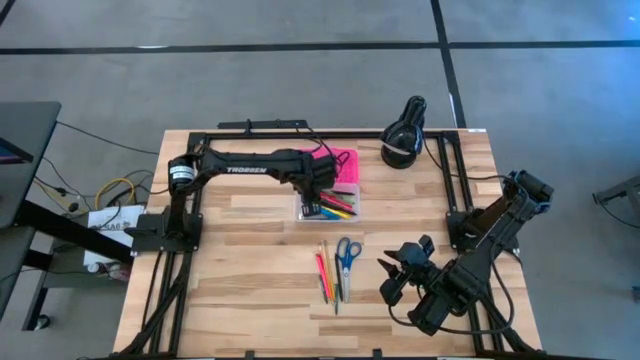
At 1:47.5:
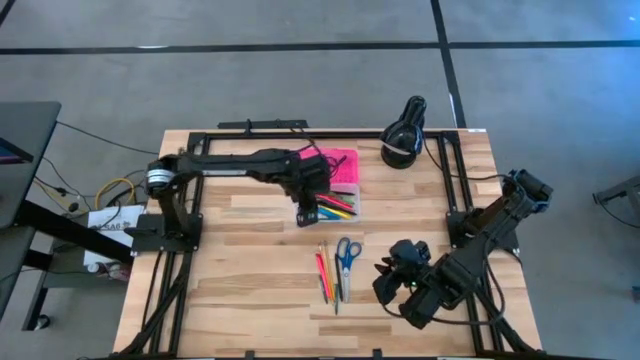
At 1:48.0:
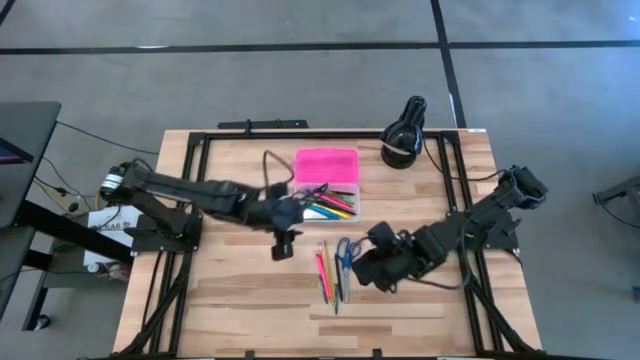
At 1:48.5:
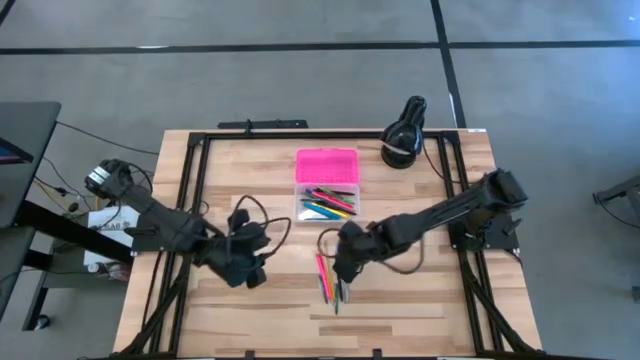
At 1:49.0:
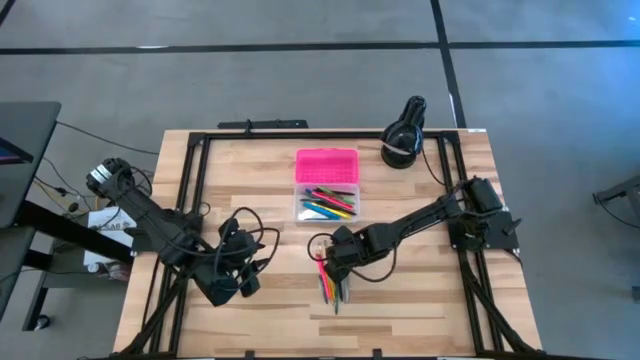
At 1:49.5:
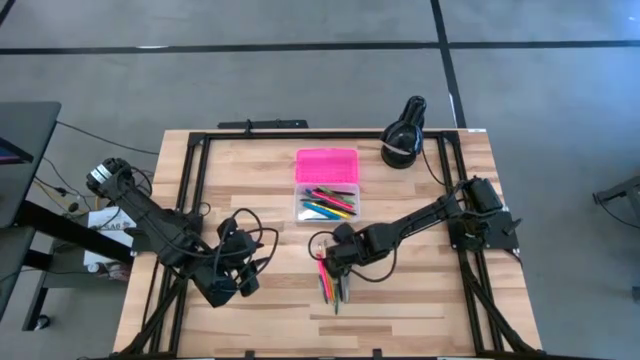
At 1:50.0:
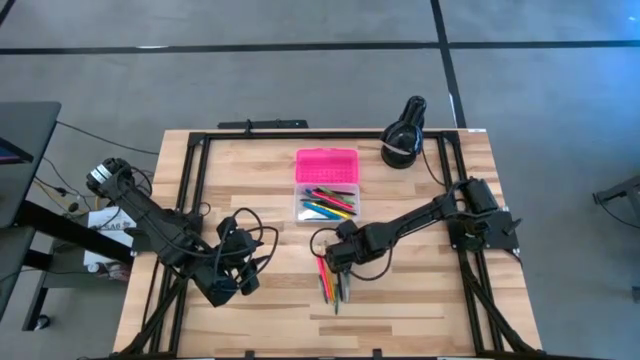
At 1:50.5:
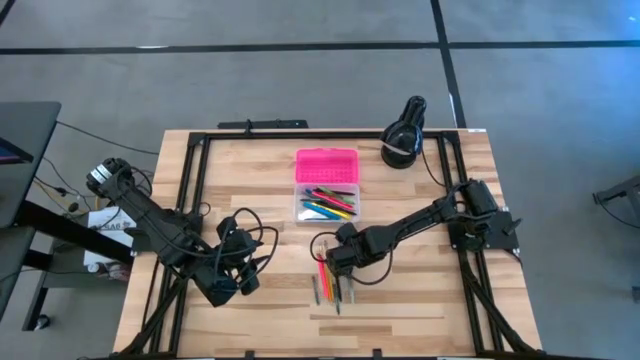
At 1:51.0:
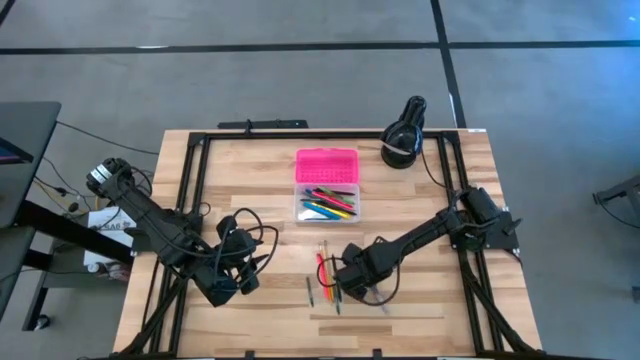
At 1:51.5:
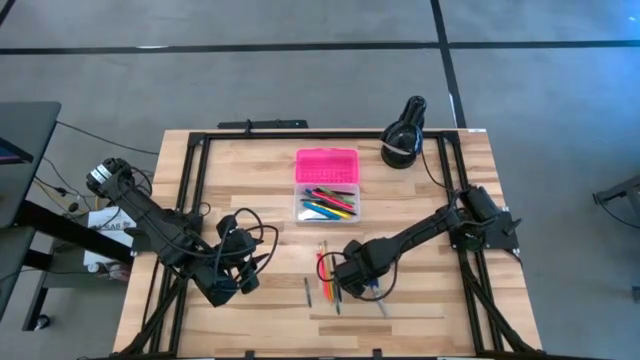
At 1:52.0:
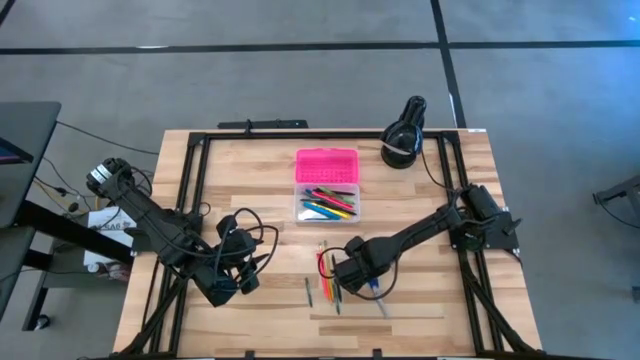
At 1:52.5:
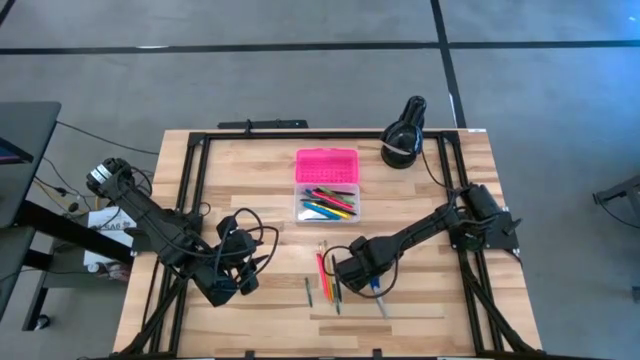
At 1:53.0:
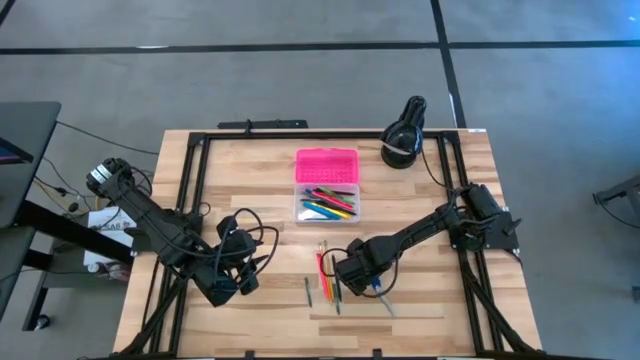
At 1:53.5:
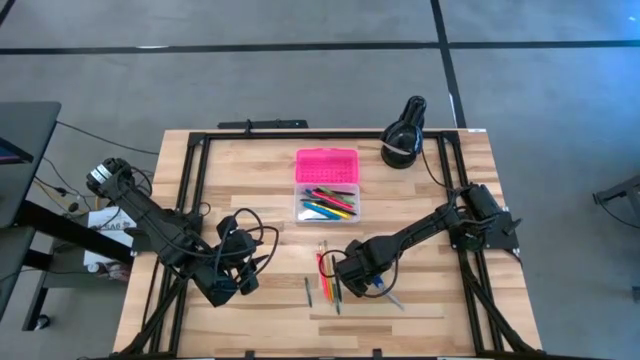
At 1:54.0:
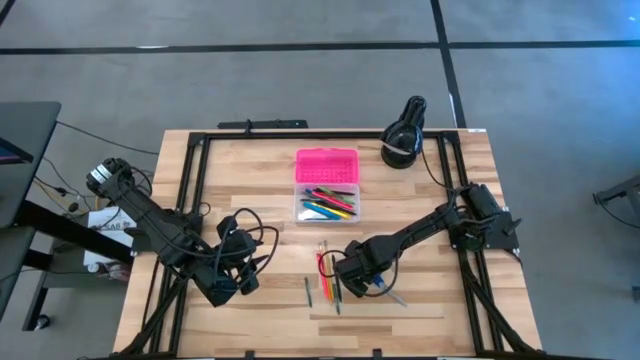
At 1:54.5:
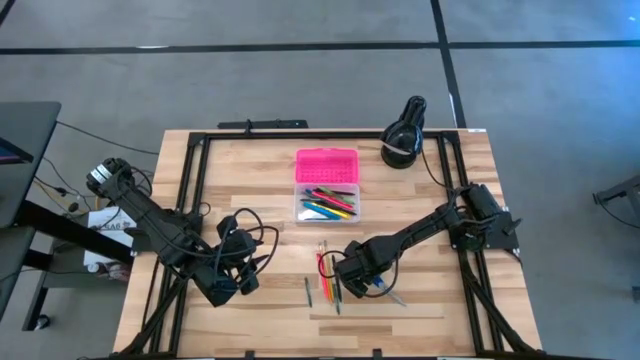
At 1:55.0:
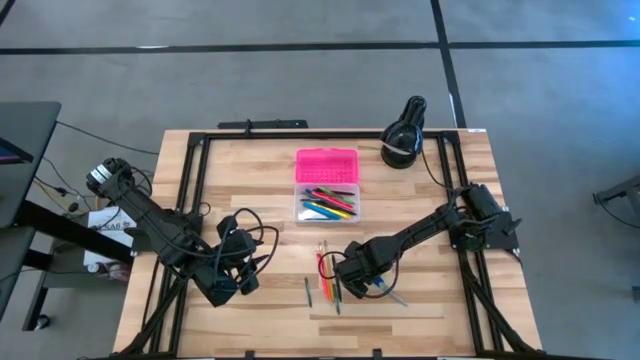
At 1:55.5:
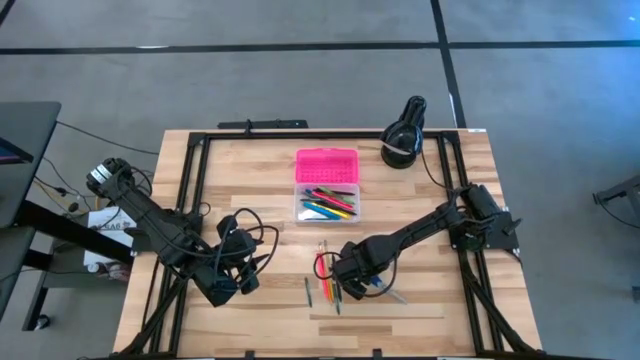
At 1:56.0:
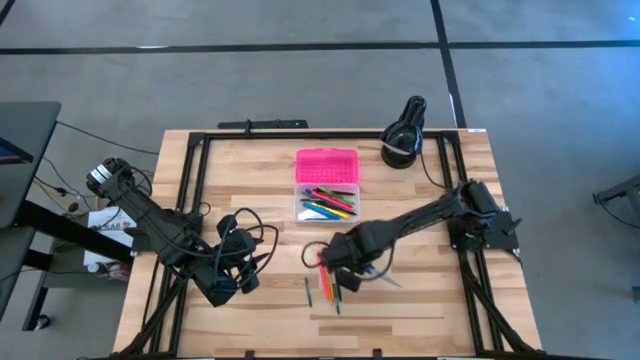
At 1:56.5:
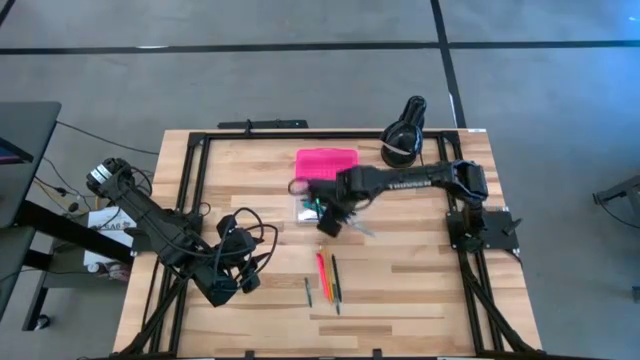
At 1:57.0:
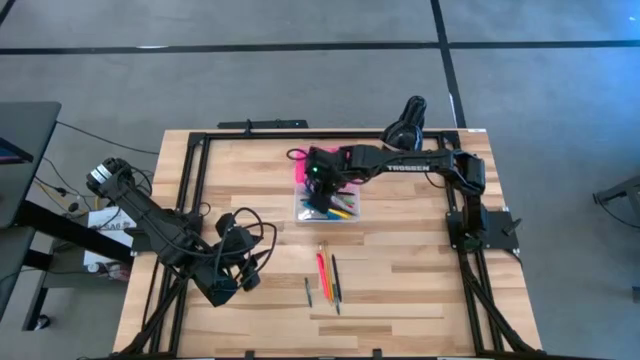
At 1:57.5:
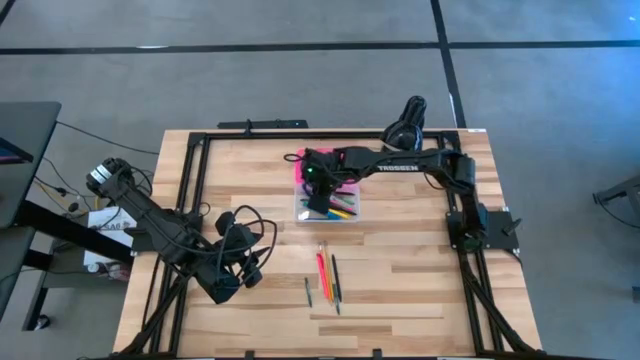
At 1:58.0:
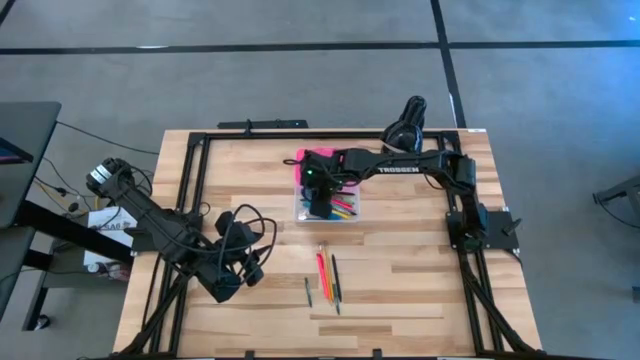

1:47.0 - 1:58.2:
Task: Pick & place school supplies into a supply box
Put the blue scissors into the pink supply box

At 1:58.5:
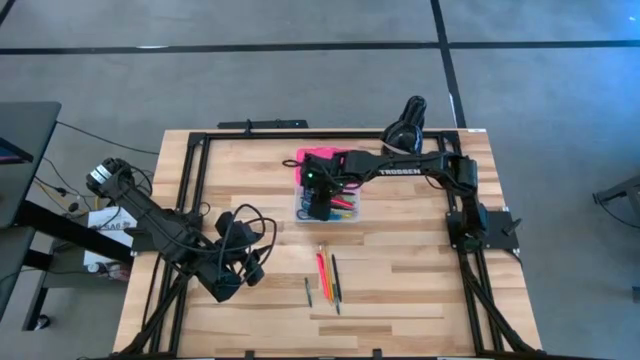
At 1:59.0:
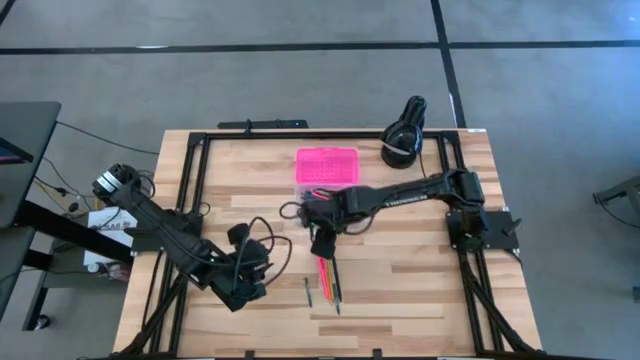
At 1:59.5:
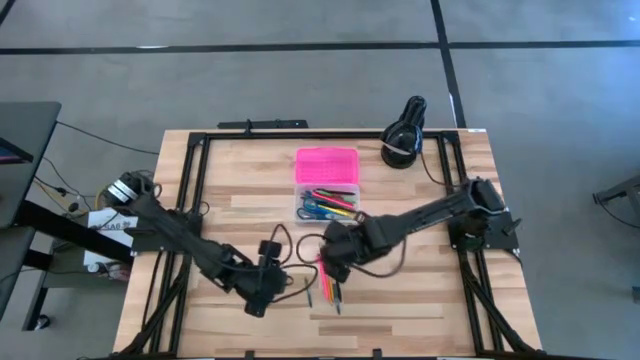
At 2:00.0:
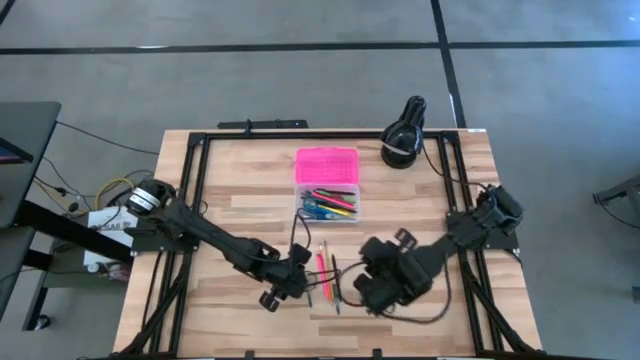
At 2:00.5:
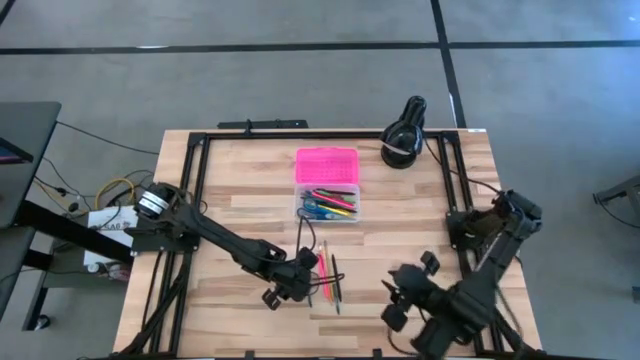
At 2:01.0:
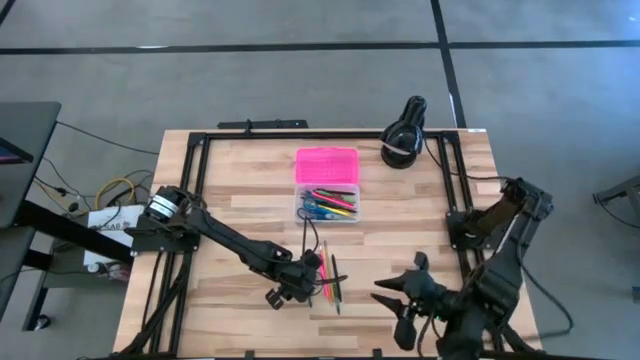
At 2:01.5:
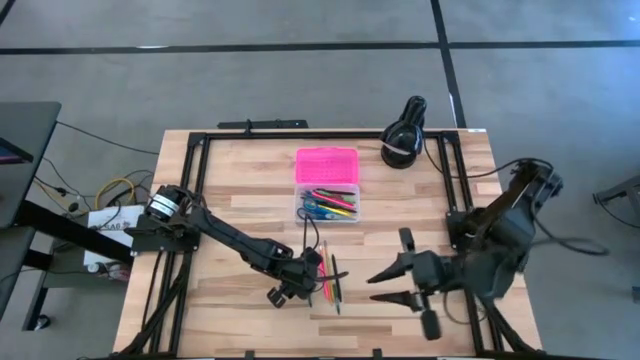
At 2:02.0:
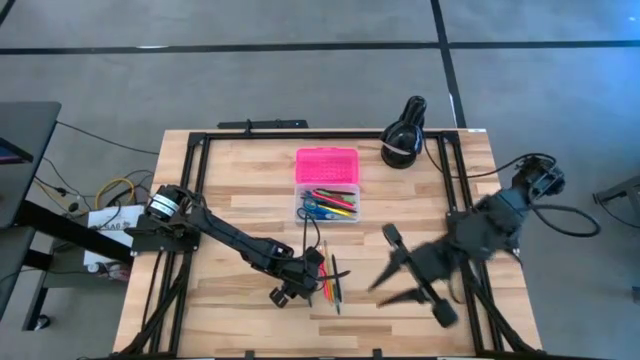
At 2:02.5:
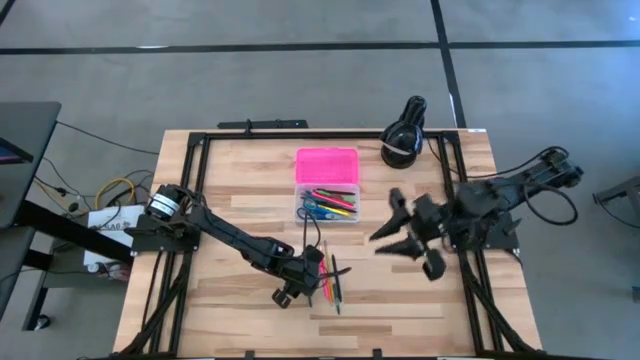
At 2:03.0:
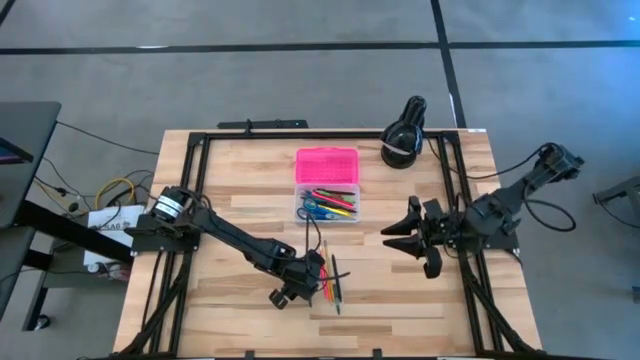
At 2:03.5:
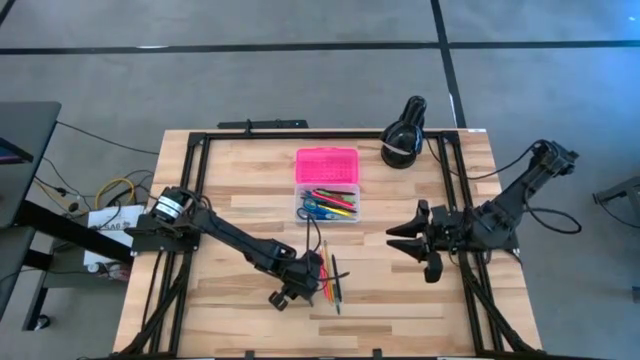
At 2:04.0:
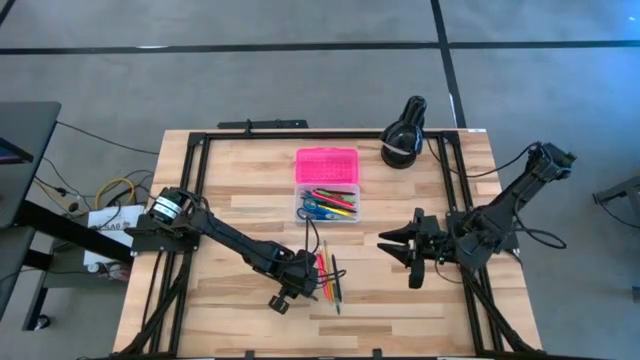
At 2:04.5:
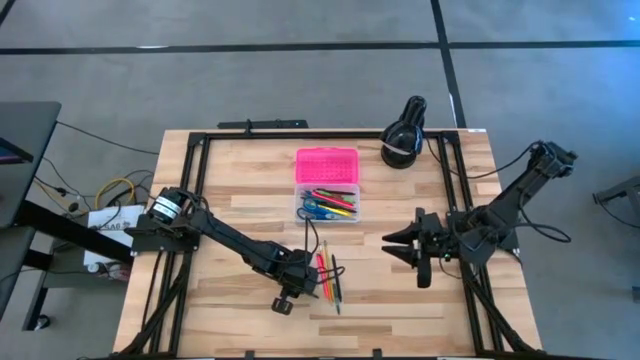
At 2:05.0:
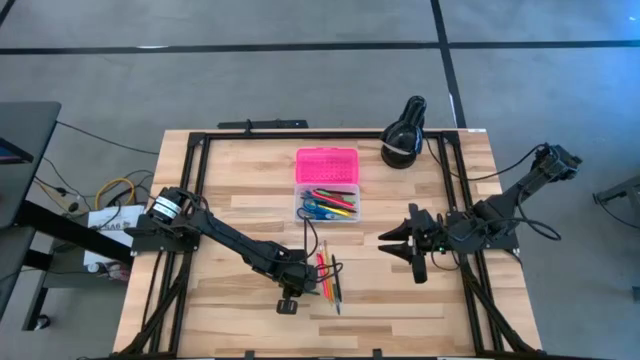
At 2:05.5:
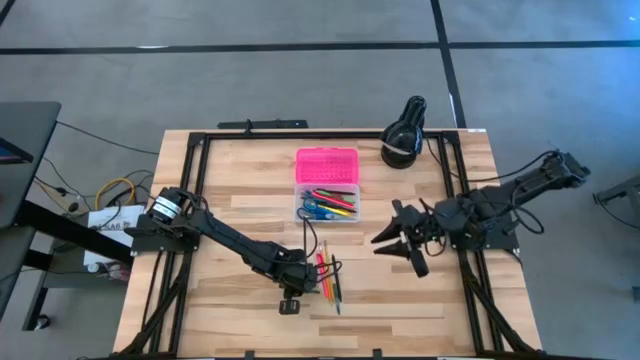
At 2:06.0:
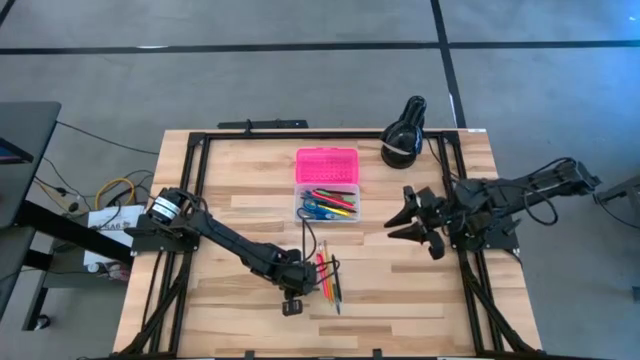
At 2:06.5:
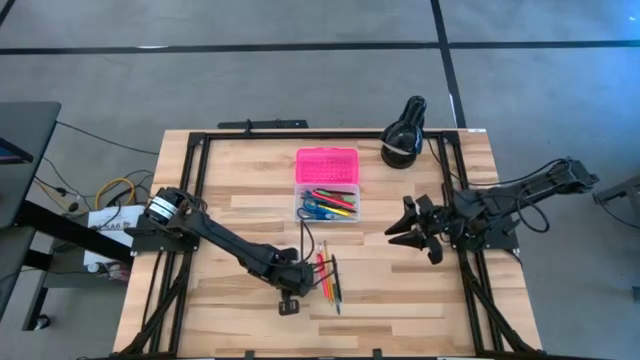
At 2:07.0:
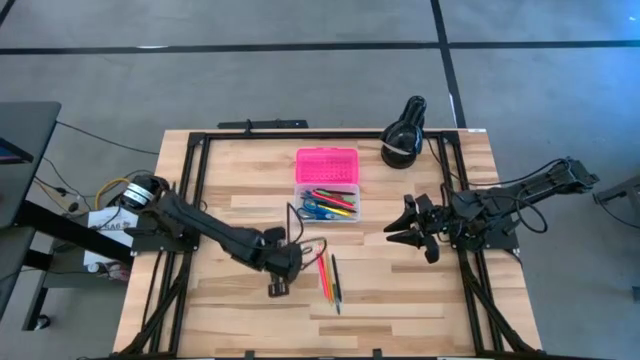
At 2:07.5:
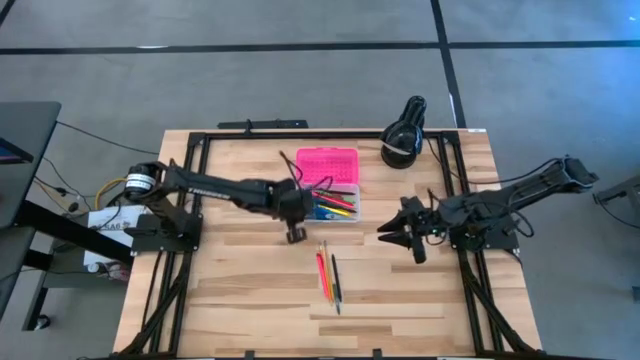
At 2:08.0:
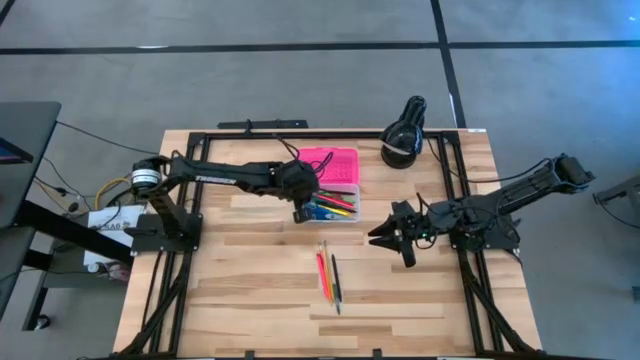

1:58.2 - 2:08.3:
Put the green crayon into the pink supply box
